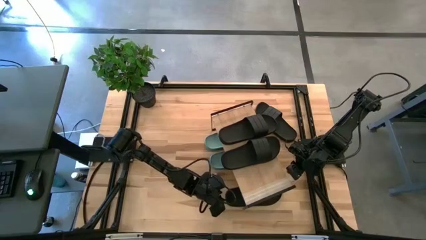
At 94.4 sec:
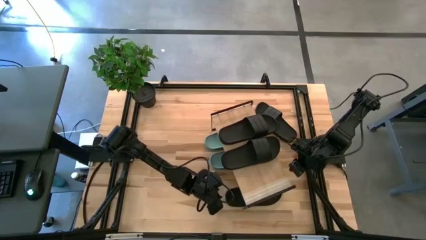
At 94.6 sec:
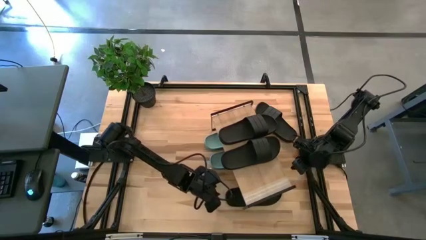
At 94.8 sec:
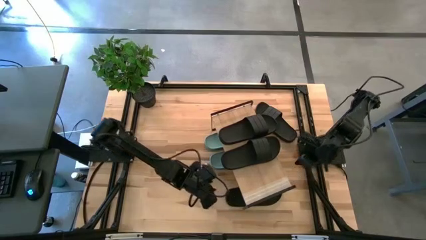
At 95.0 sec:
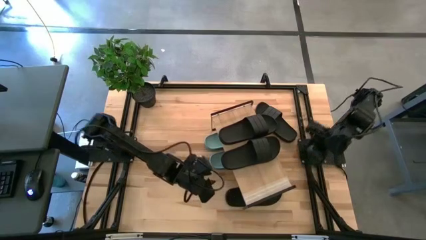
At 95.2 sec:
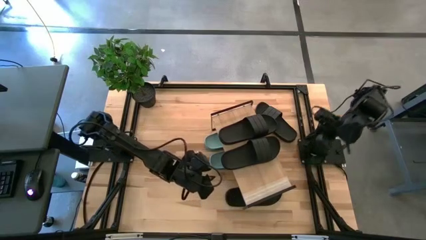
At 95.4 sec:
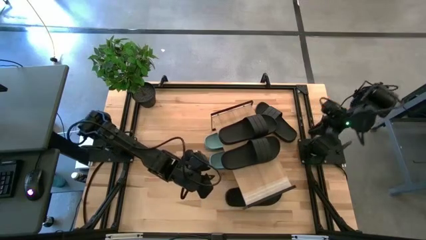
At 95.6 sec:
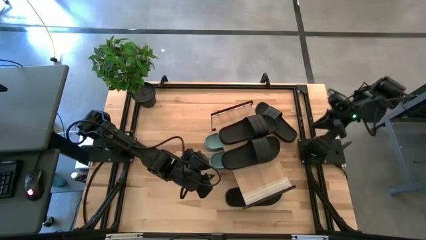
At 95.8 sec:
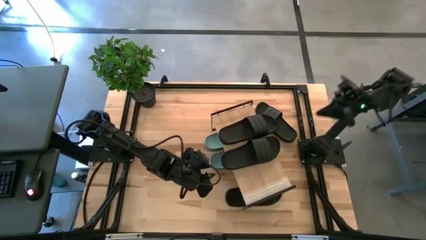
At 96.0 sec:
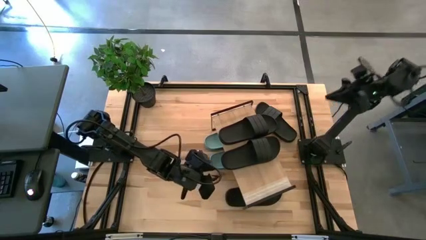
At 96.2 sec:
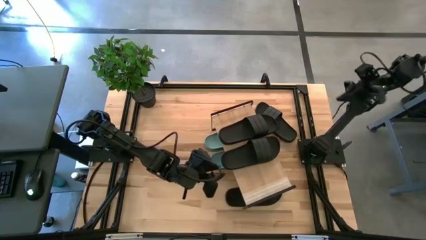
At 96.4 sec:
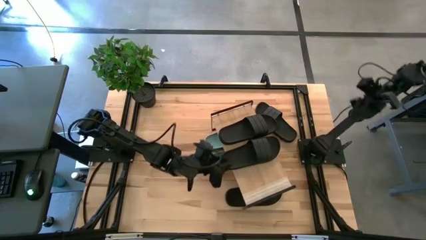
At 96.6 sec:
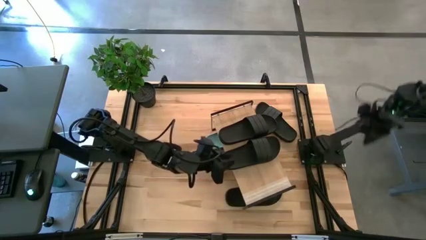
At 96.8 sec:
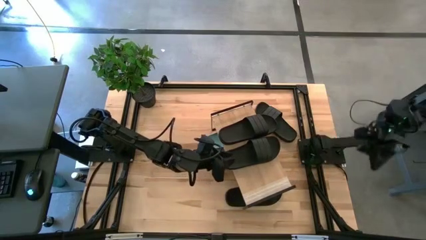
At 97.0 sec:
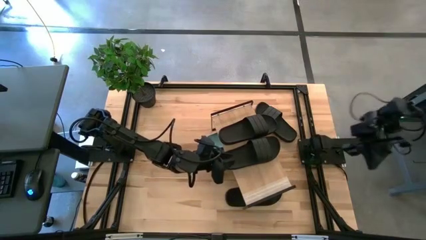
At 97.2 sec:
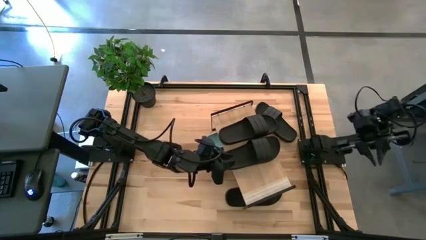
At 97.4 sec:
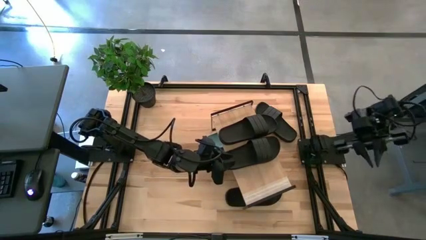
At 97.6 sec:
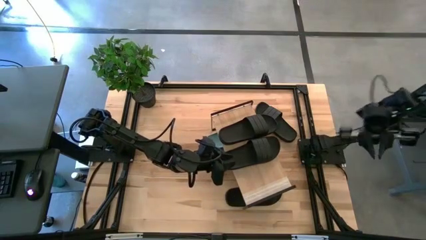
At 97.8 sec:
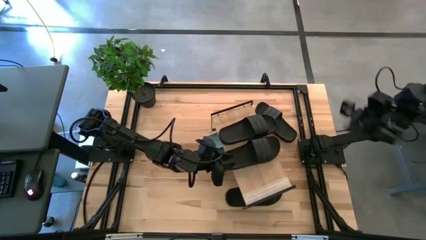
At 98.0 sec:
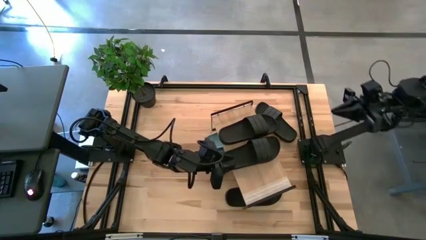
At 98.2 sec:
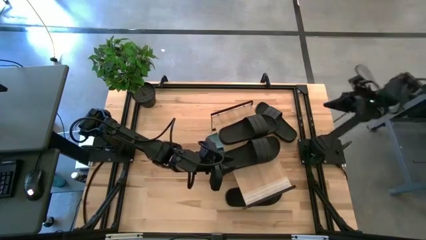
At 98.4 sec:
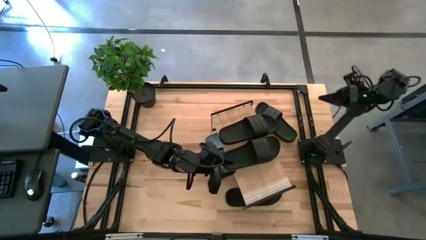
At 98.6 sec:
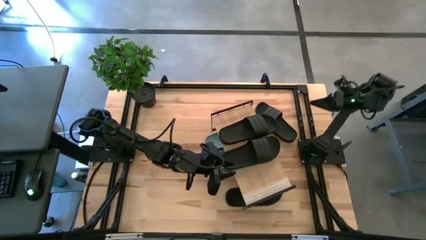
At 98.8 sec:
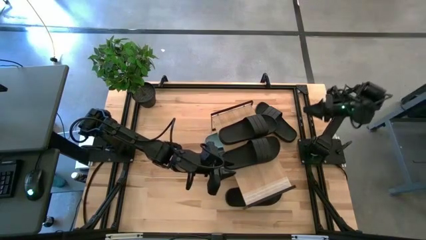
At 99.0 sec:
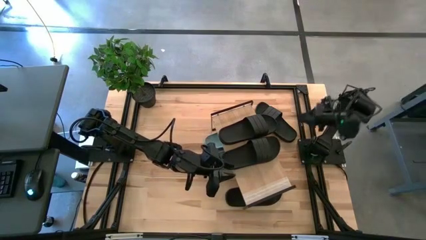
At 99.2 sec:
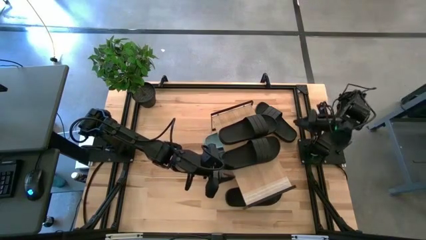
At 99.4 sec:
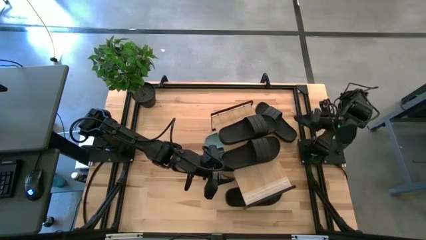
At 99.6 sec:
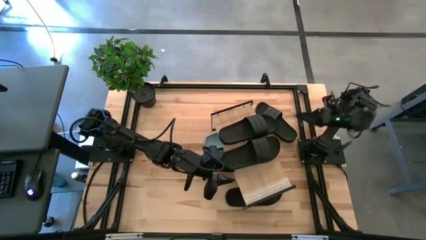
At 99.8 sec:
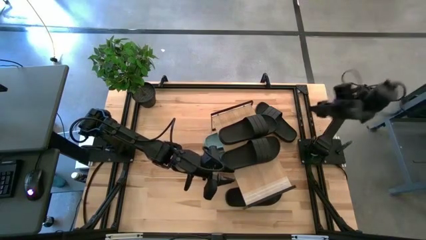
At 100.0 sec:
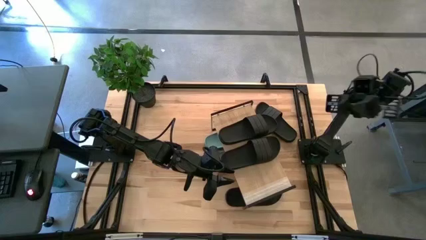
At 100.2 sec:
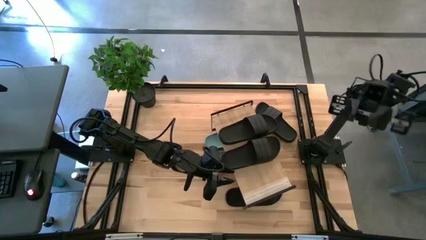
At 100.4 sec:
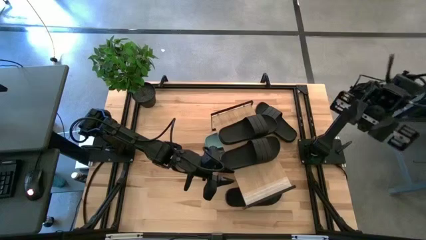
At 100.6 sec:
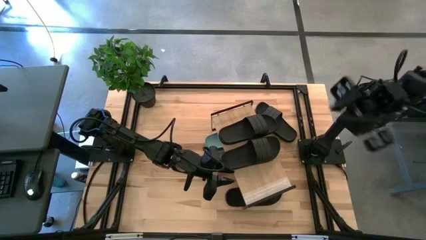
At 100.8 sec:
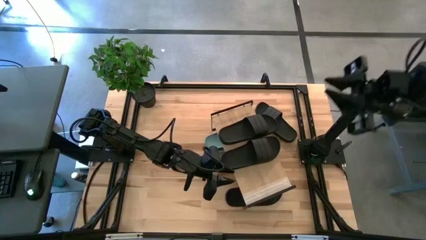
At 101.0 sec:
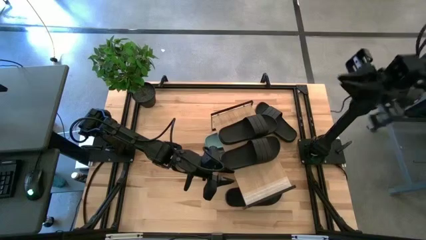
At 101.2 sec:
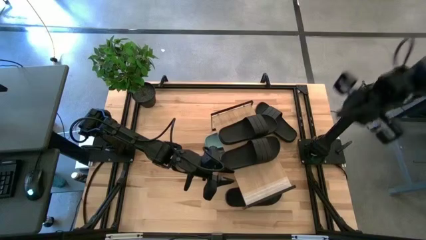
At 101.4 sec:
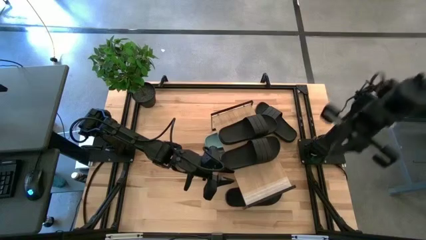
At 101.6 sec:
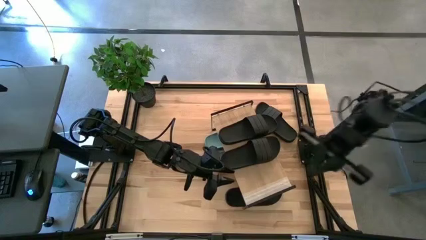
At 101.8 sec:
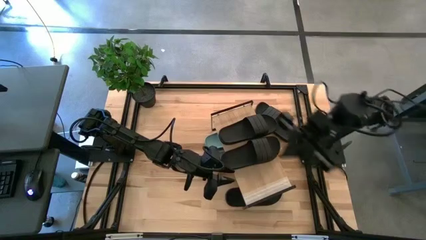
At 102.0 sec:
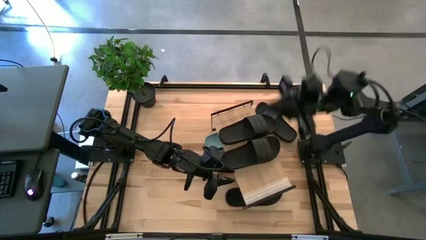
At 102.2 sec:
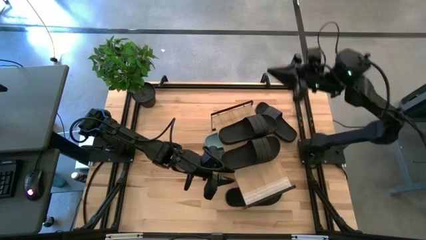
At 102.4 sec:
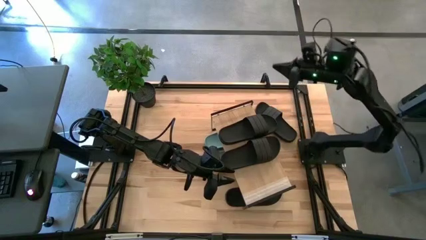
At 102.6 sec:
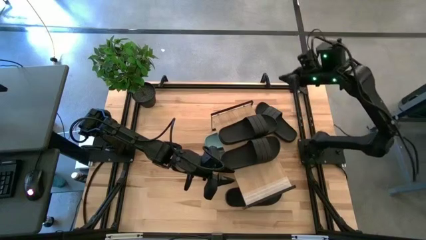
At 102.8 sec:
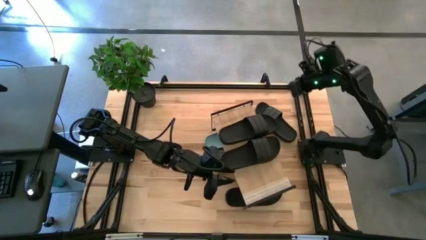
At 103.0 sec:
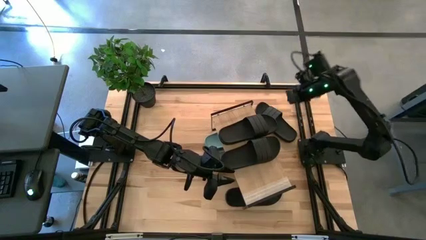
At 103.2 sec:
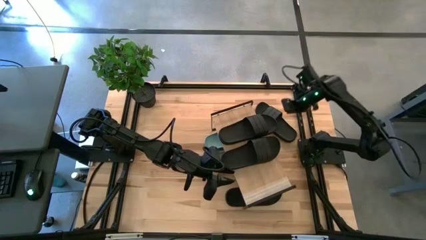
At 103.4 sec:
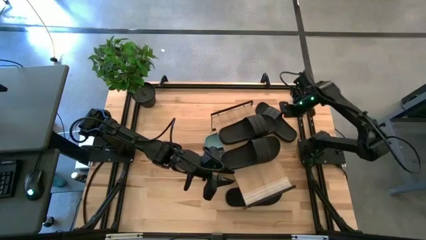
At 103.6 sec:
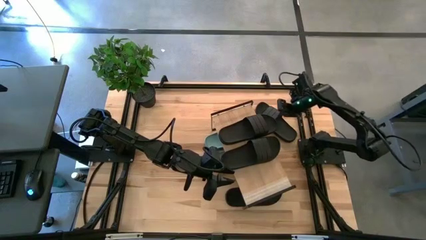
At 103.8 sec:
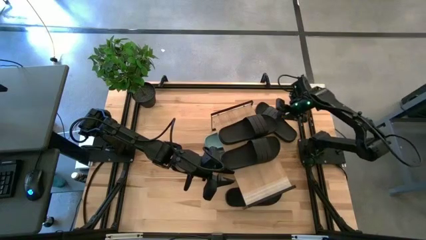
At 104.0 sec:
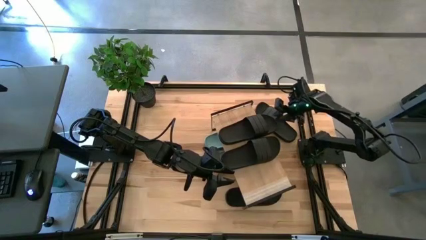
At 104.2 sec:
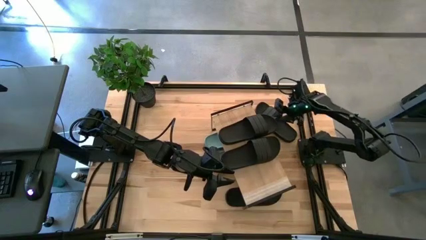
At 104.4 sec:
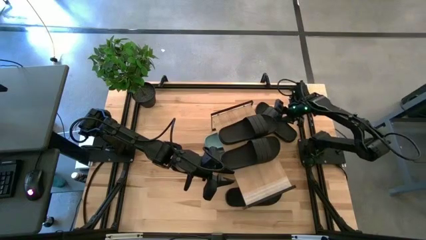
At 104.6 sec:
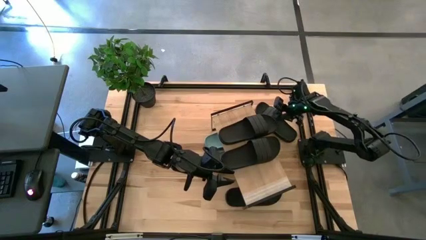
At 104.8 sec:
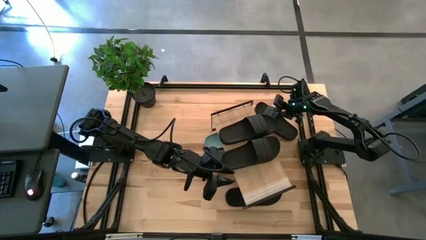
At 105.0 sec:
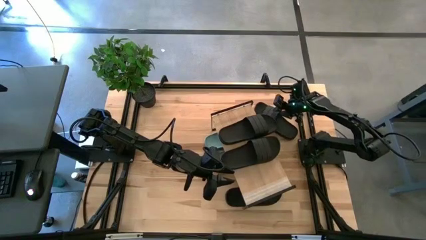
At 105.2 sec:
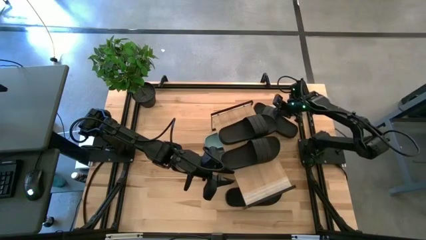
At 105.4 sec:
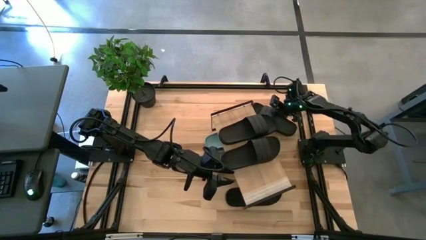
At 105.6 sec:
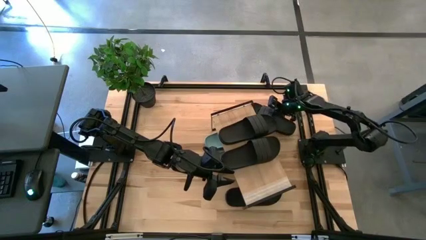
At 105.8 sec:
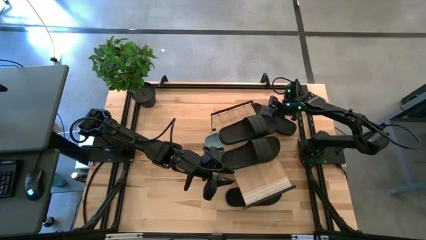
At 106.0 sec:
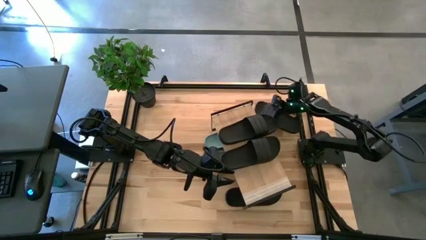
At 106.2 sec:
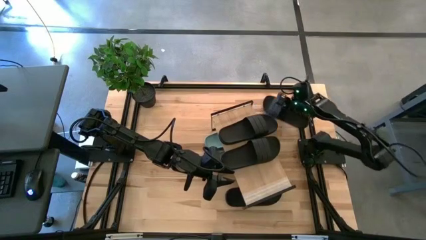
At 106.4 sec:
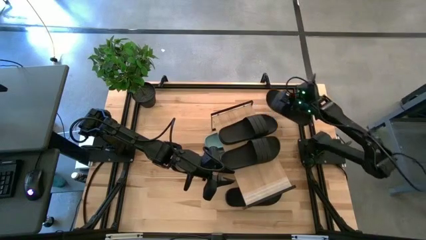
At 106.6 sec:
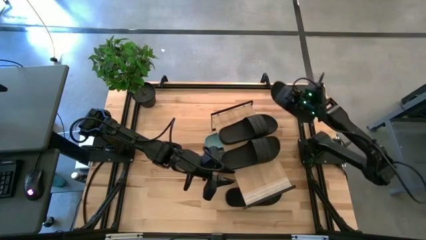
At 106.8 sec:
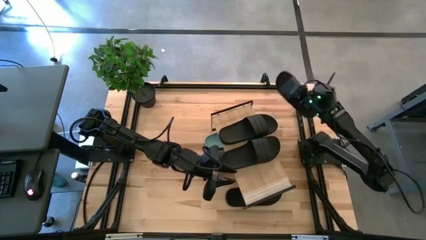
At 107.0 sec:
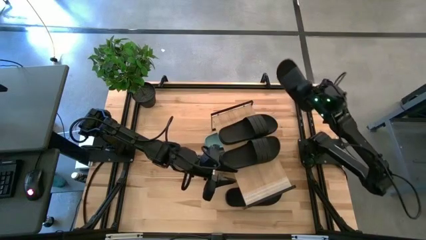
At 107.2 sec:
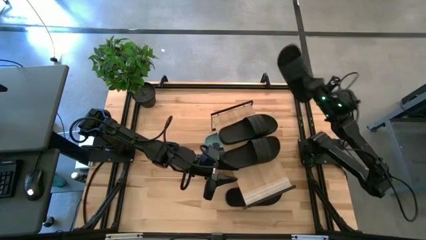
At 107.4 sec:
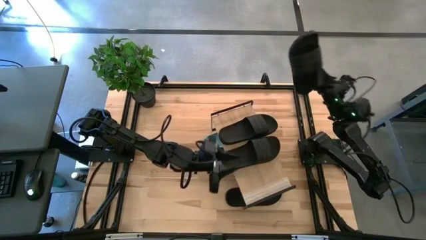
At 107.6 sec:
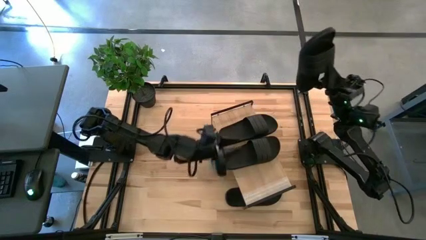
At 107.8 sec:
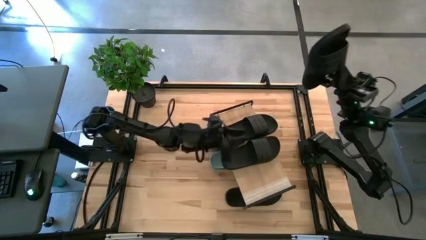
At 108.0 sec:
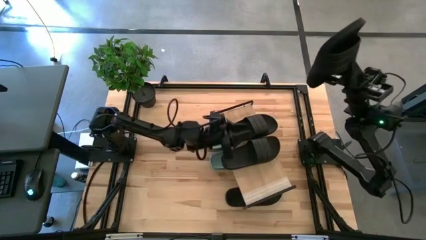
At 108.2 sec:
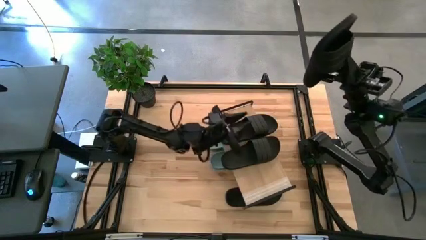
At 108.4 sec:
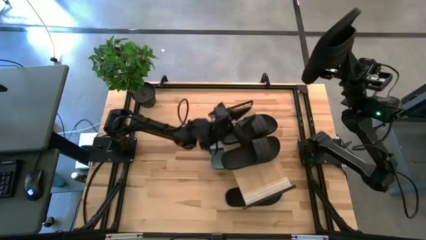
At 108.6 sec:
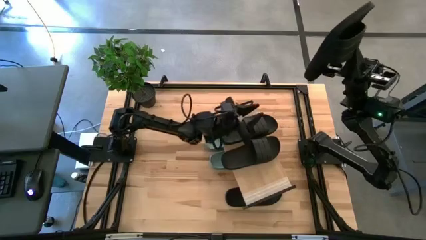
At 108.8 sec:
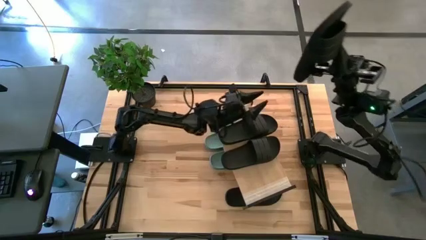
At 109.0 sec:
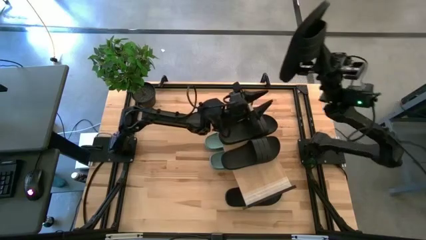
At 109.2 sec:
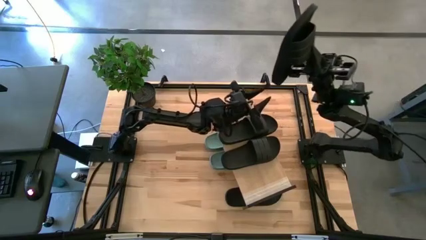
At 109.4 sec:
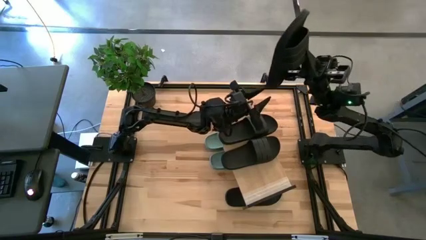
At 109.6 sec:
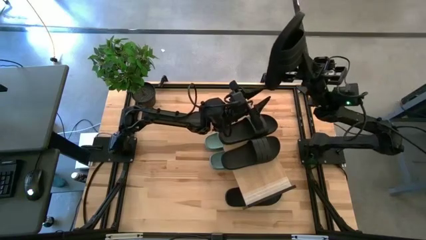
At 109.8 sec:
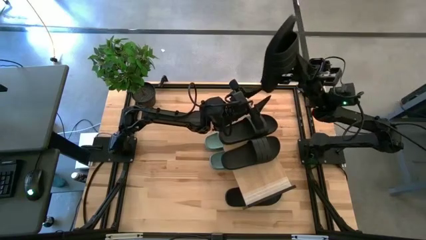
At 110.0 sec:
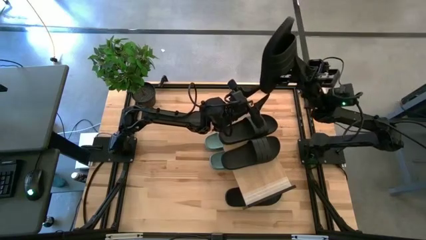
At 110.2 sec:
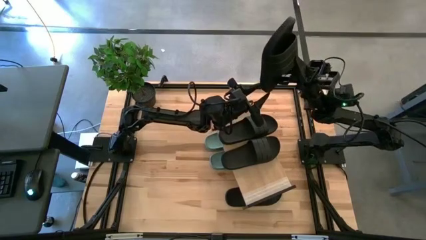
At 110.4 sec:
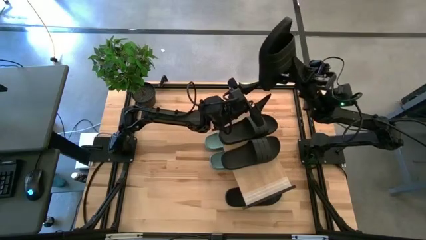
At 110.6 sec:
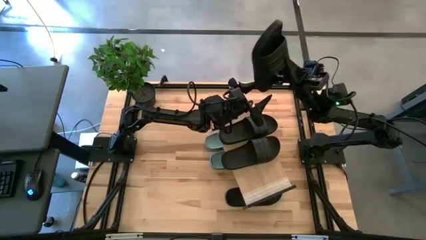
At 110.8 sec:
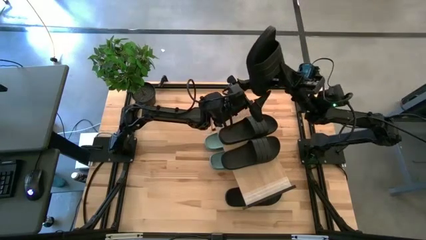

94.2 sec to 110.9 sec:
Task: Pick and place slides into the shelf
Put the black slides under the shelf
